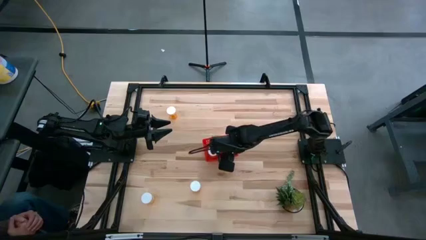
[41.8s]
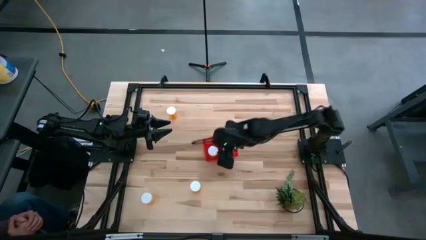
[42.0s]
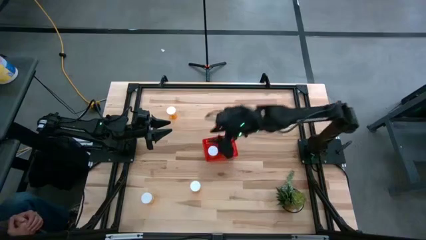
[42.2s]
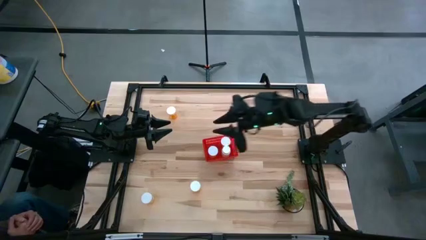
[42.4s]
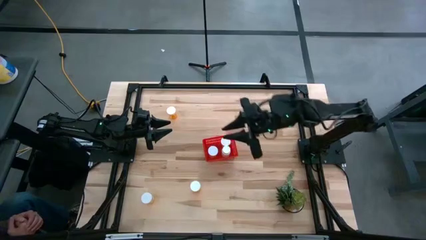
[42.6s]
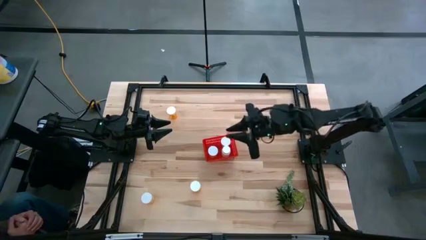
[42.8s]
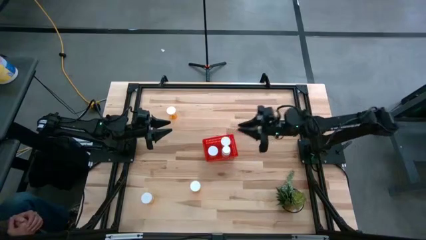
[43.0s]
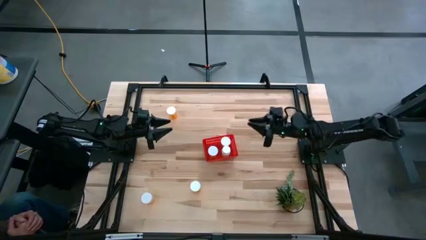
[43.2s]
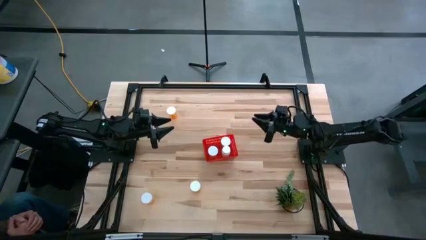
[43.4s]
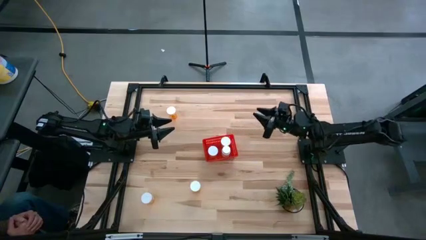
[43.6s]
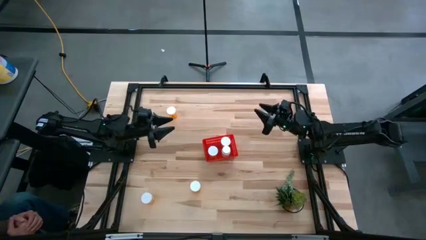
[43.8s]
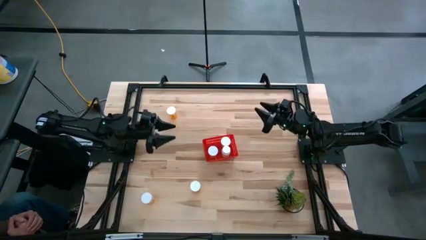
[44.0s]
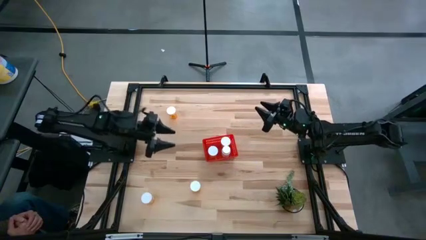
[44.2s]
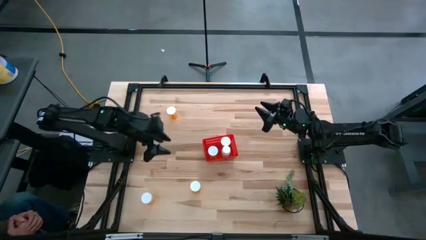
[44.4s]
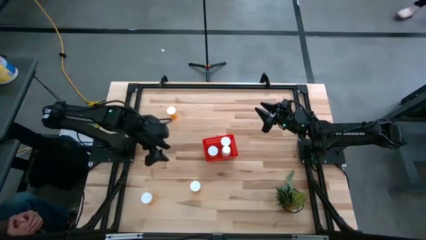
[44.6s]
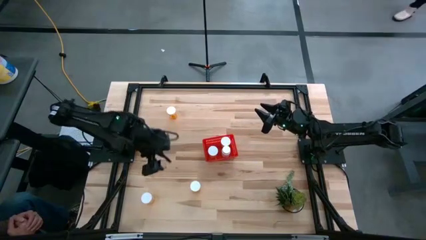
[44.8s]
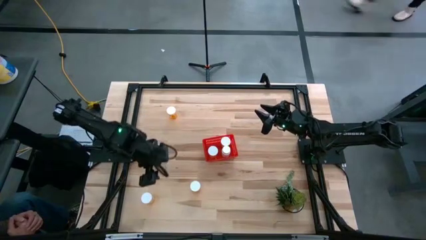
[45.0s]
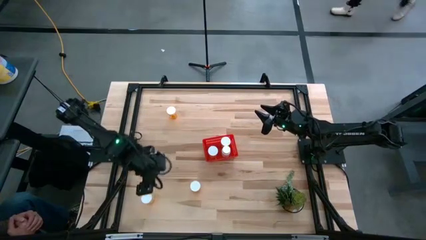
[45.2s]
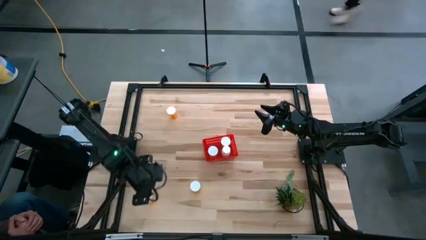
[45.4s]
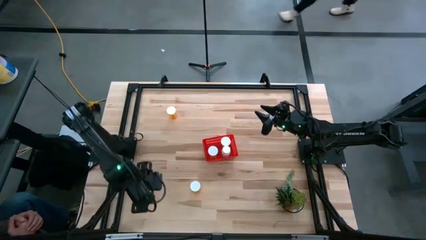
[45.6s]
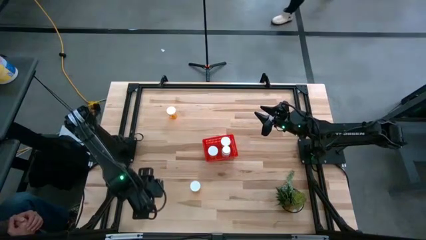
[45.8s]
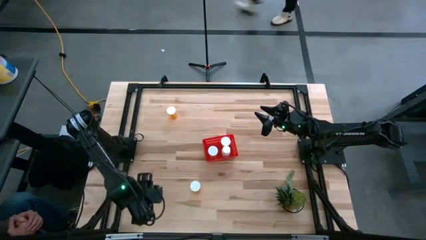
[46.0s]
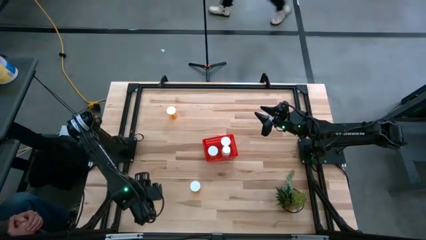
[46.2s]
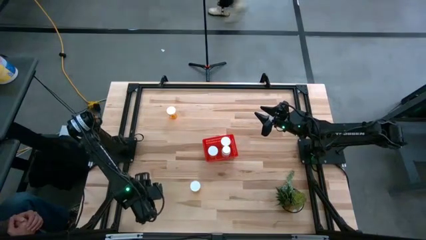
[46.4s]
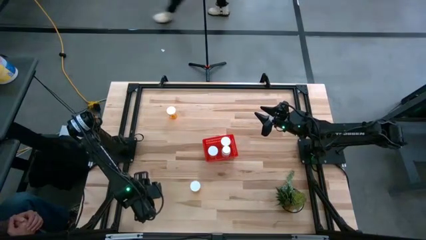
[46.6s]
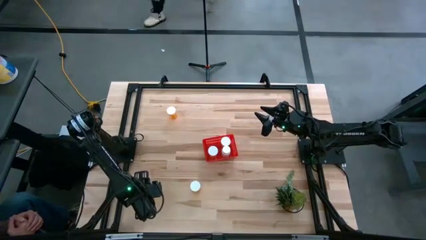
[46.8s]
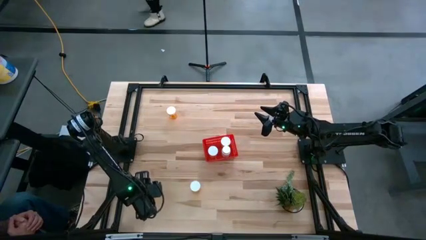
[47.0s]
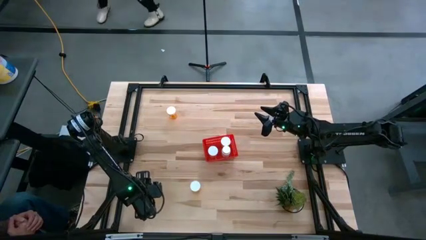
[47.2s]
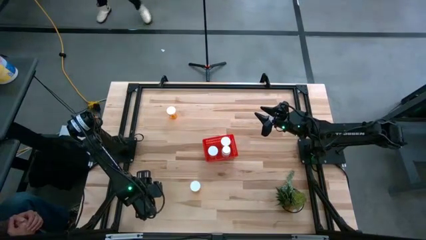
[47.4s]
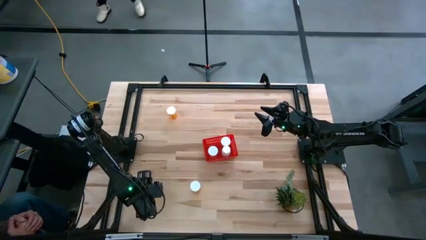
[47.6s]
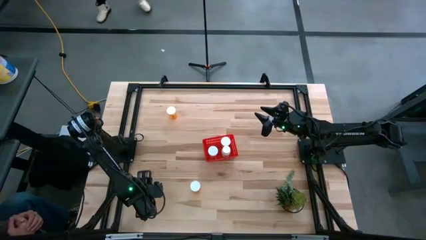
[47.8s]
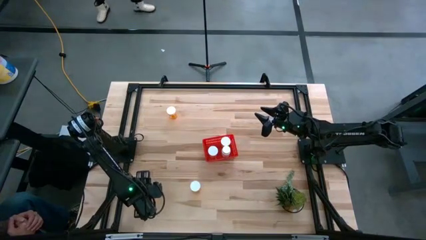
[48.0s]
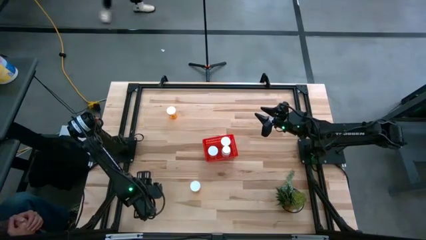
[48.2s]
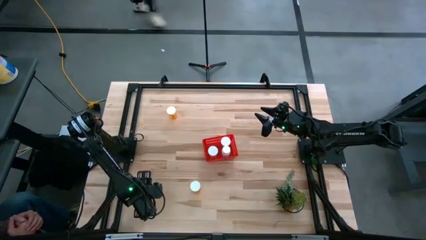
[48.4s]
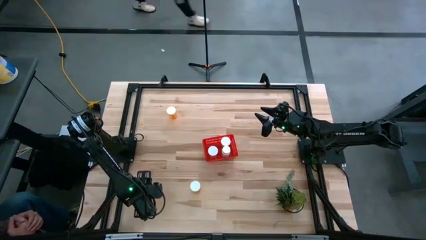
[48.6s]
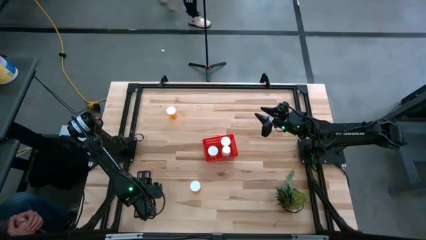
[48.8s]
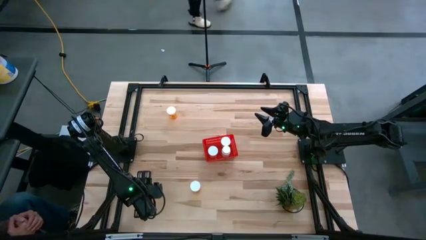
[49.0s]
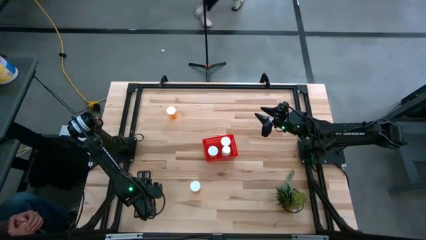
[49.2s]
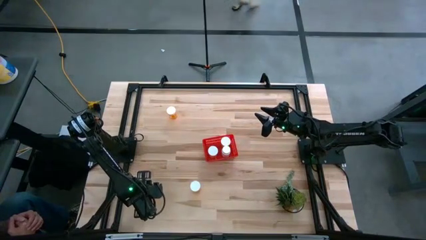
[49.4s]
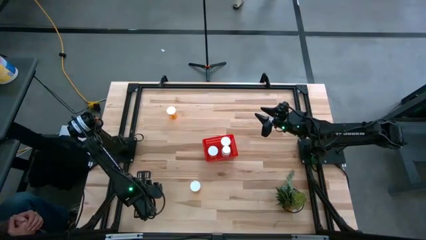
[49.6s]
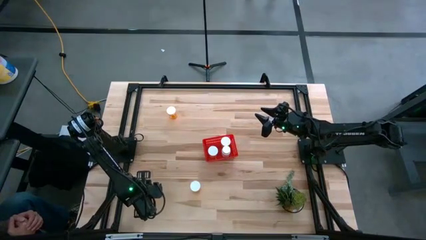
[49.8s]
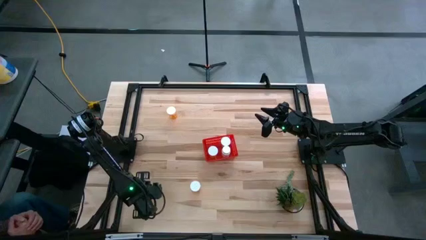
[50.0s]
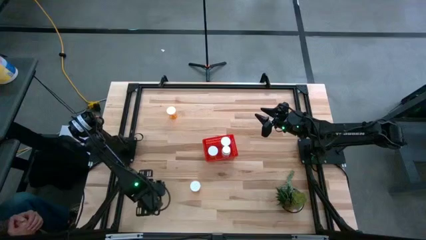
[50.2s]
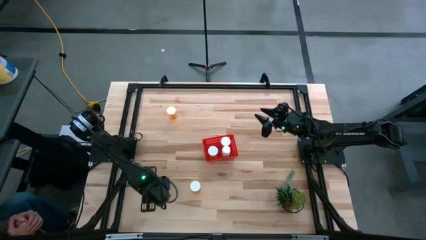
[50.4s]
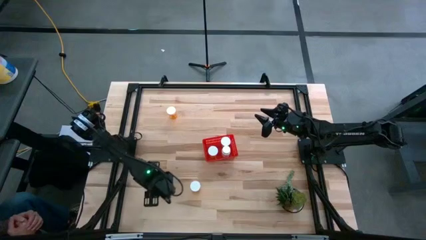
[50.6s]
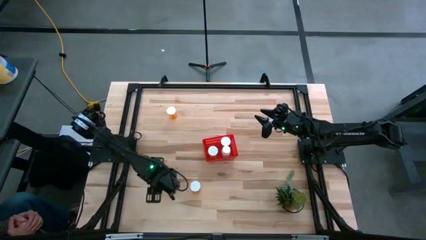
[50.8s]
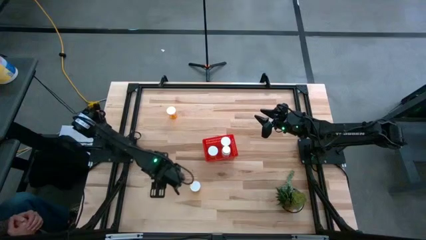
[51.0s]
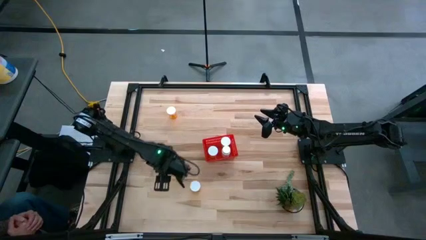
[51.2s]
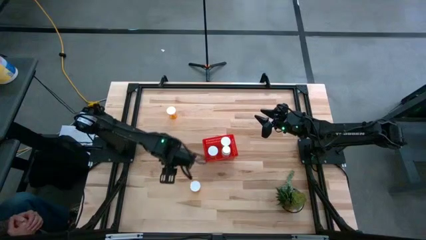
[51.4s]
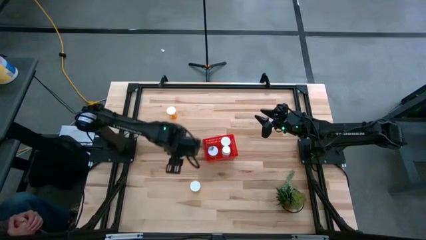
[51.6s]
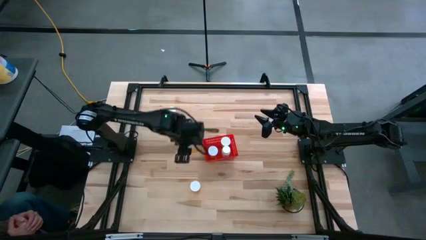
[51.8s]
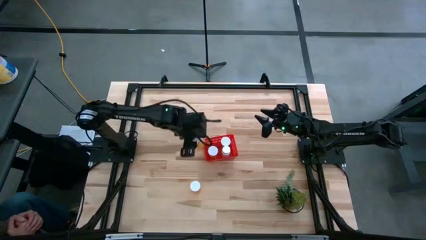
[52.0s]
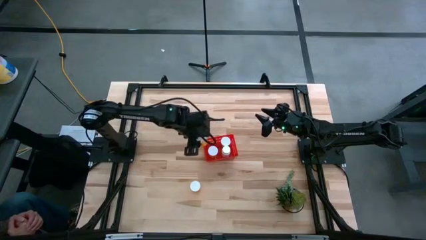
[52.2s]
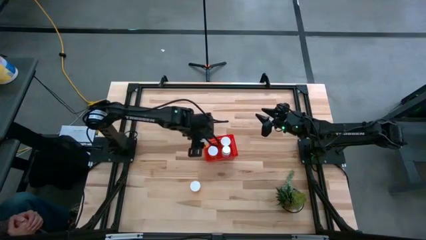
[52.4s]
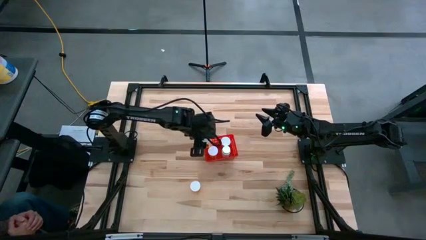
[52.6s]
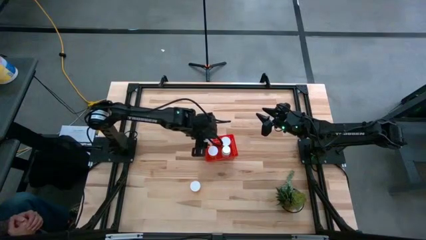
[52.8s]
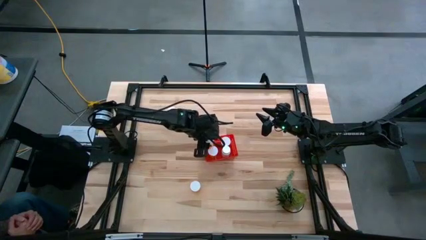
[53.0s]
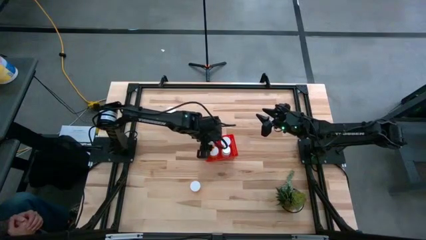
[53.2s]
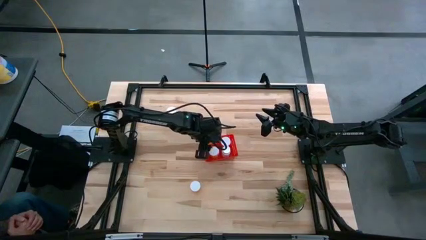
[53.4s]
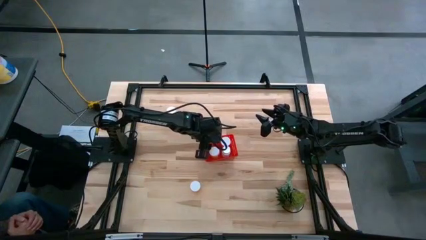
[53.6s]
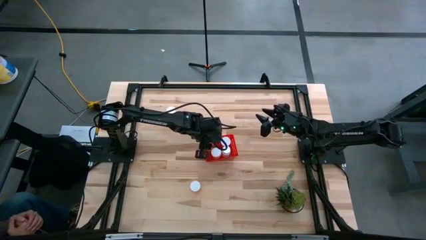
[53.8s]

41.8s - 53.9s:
Task: Pick and place pill bottles into a basket
Put the orange medicine bottle into the bin
